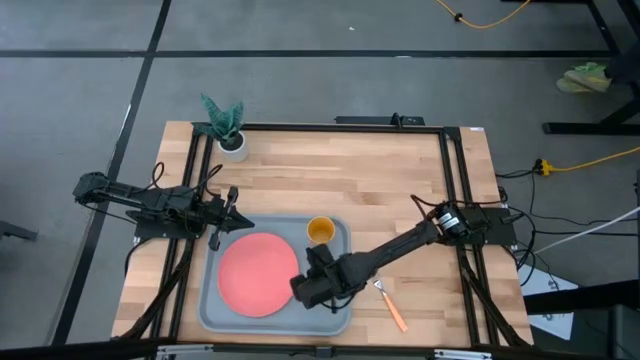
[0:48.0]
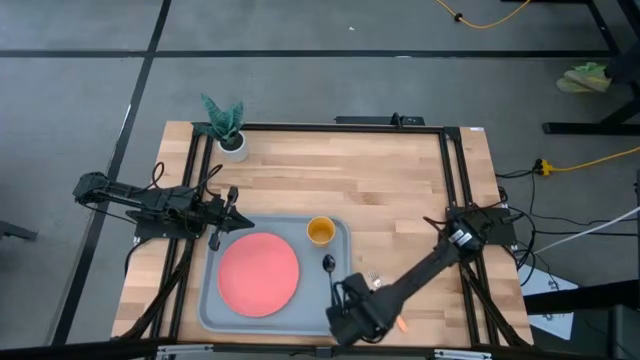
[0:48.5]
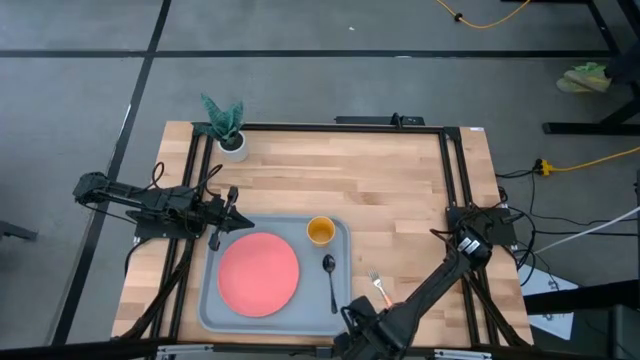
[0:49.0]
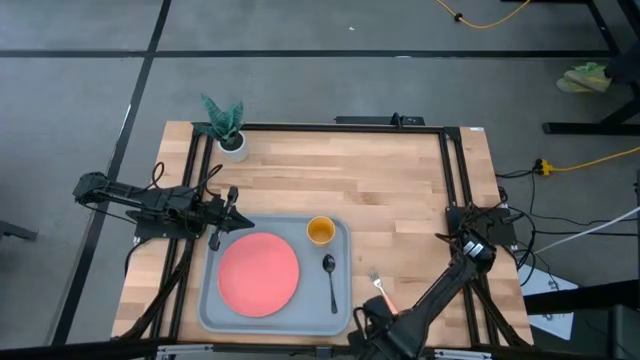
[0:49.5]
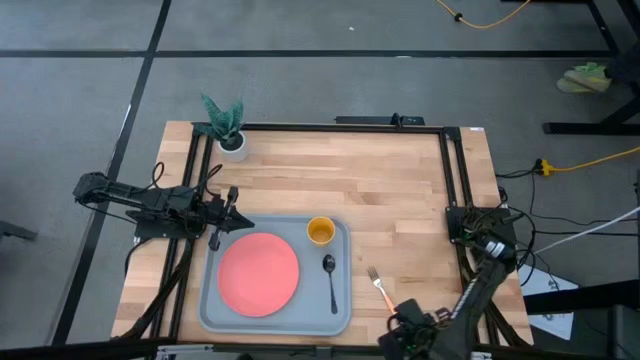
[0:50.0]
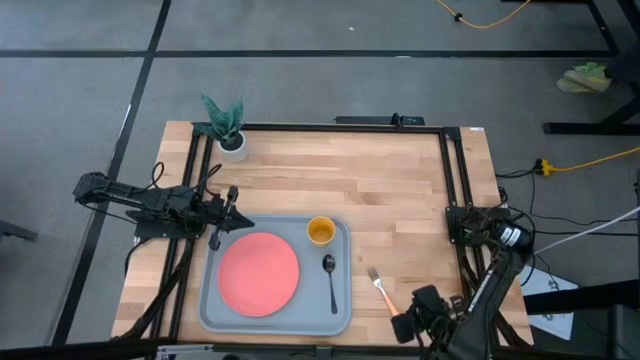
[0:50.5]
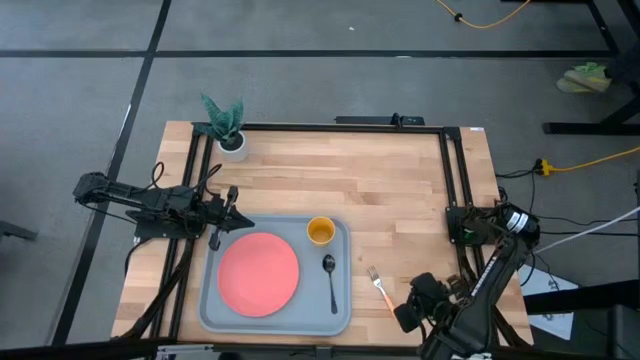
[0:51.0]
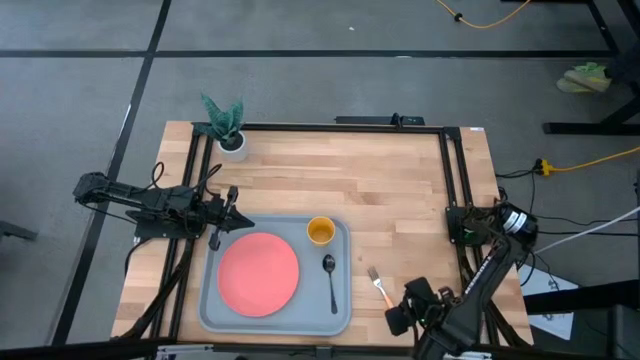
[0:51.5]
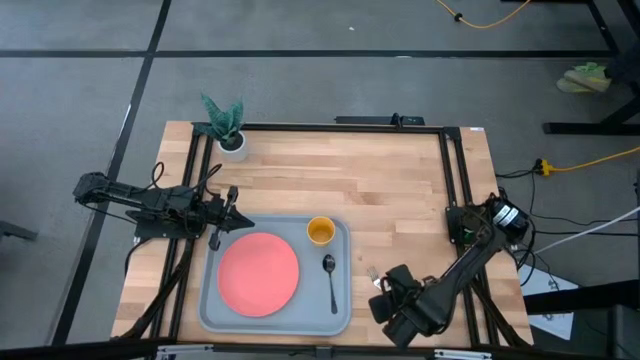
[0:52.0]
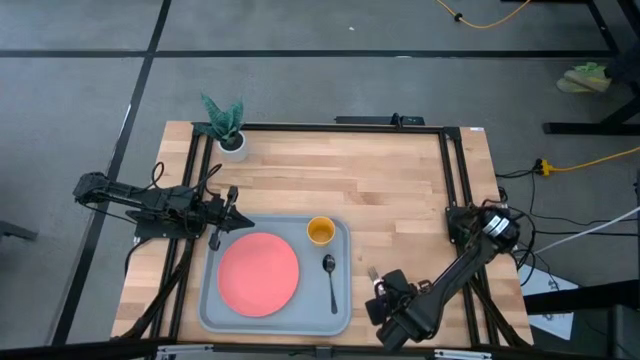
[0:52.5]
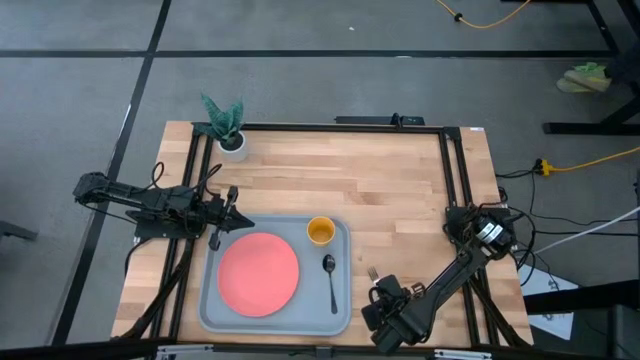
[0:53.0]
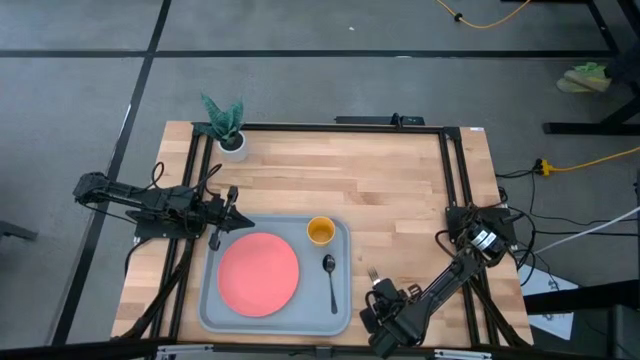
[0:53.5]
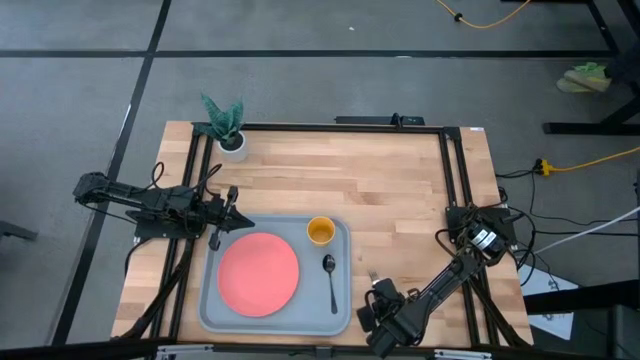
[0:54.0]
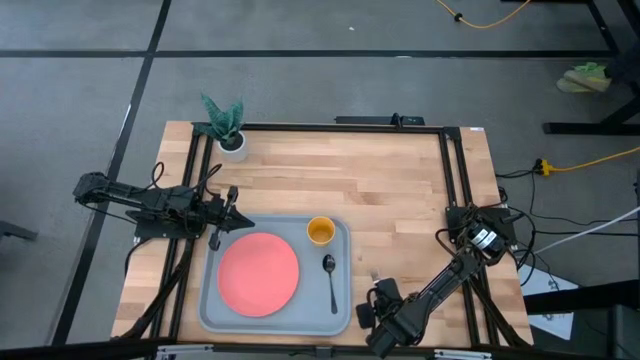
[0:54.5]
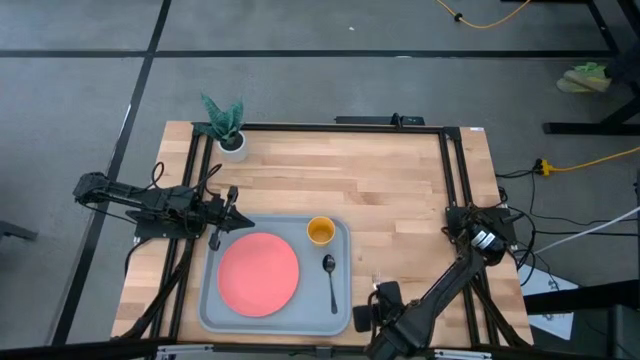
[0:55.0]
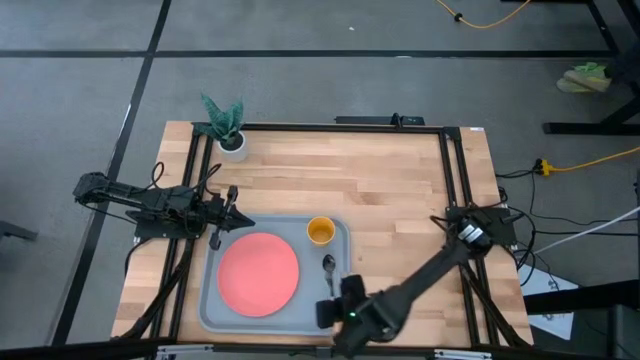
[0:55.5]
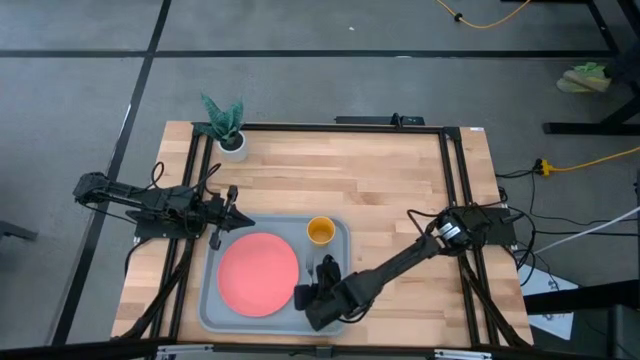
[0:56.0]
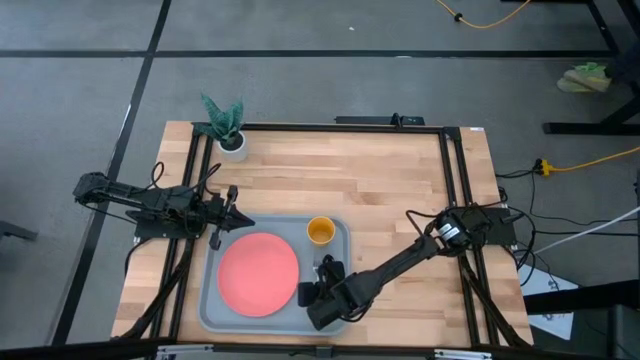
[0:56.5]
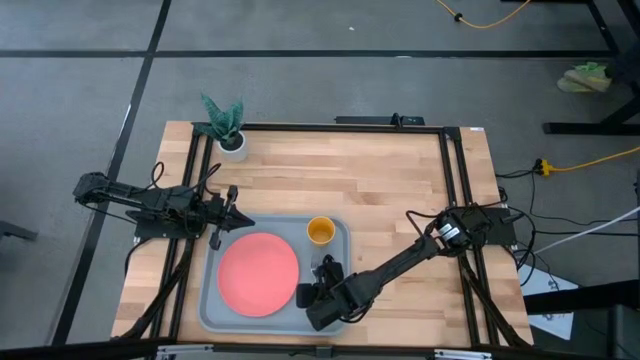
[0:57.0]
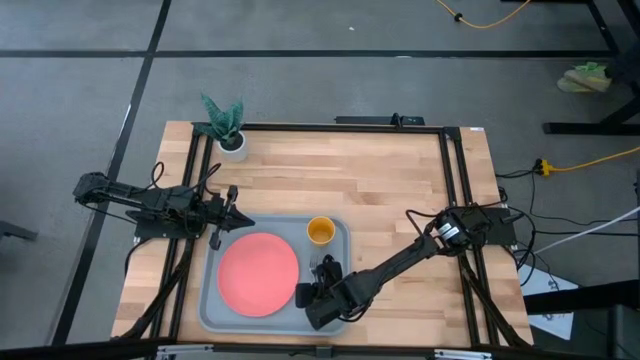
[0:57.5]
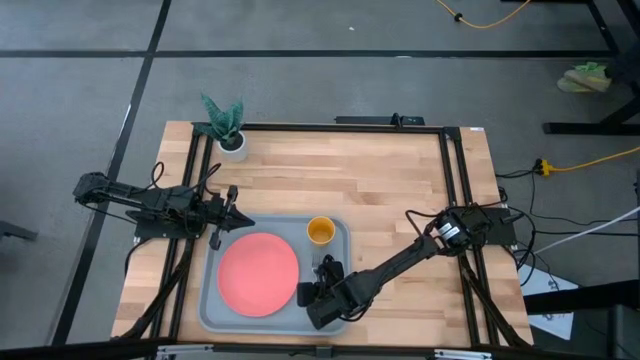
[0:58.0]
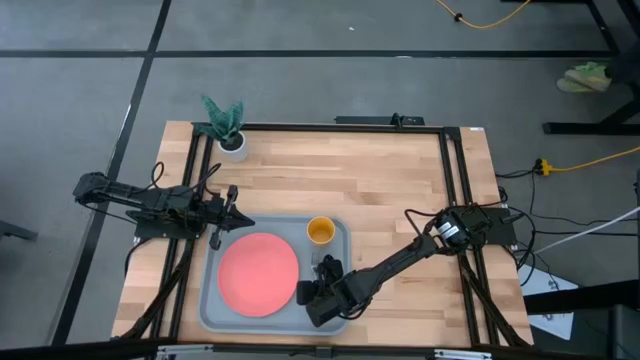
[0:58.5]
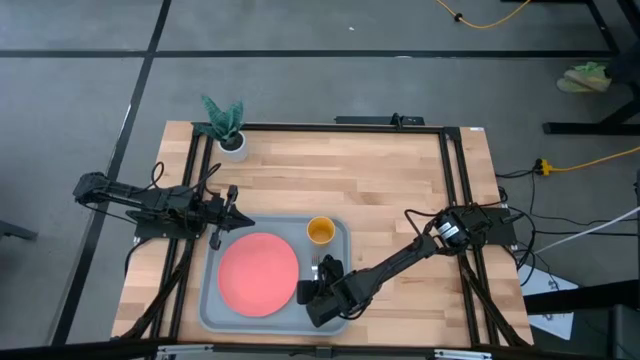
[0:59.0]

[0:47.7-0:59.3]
Task: Pick and place plate/cup/fork/spoon on tray
Put the orange fork on the gray tray

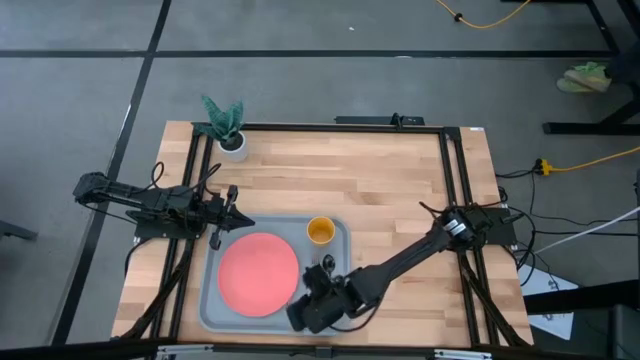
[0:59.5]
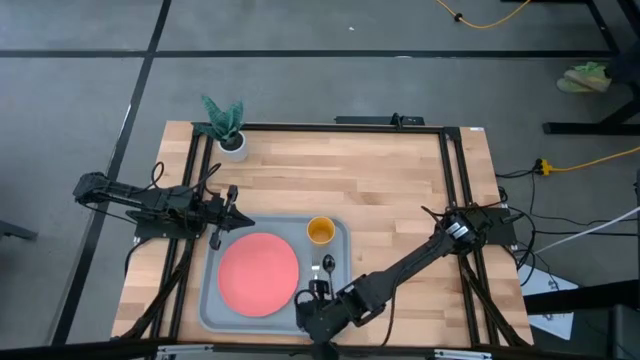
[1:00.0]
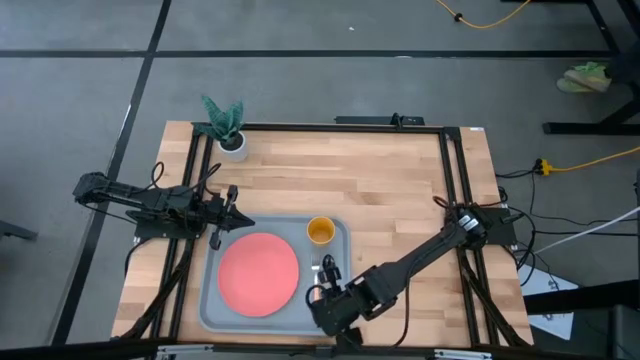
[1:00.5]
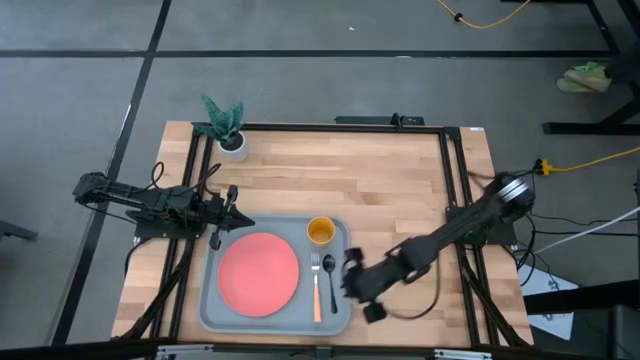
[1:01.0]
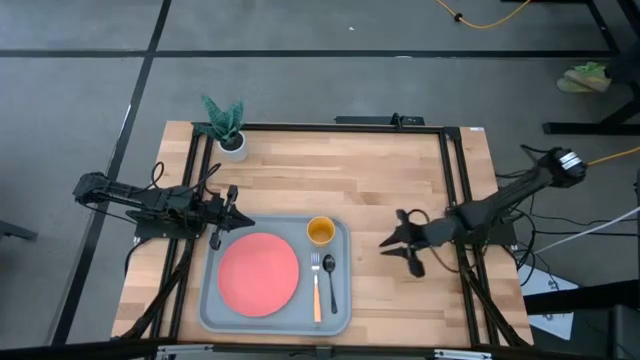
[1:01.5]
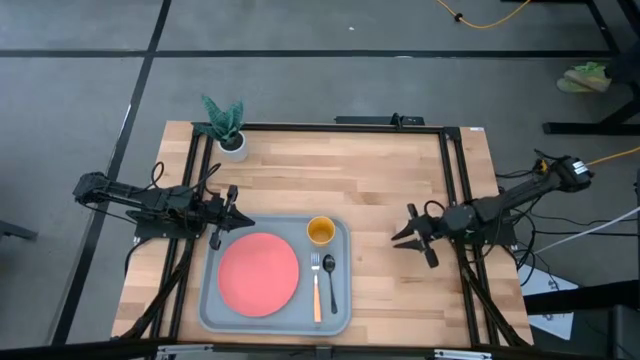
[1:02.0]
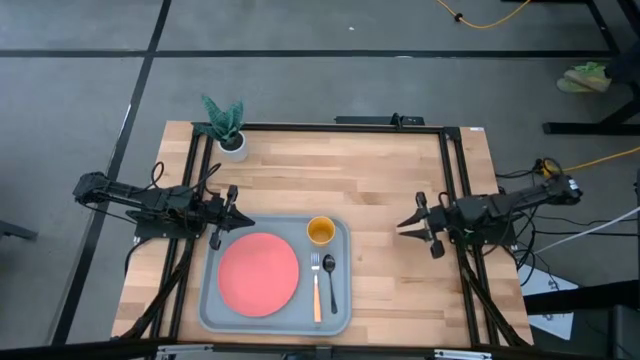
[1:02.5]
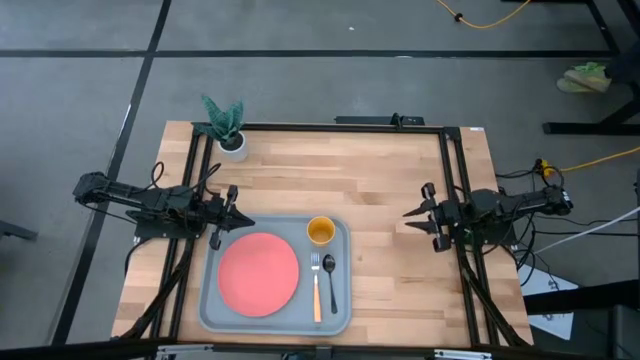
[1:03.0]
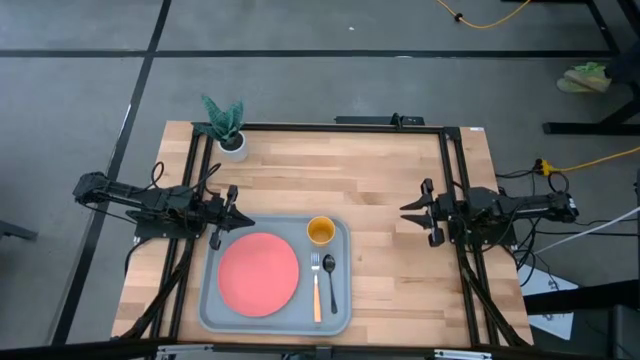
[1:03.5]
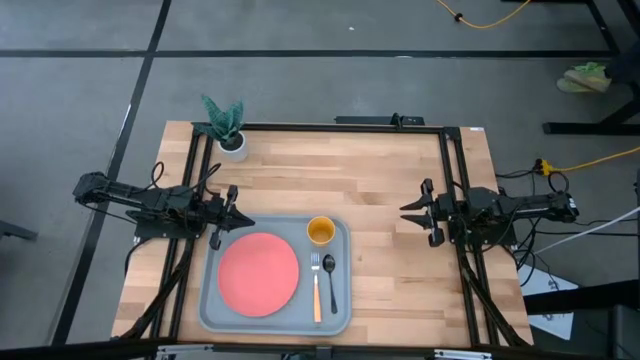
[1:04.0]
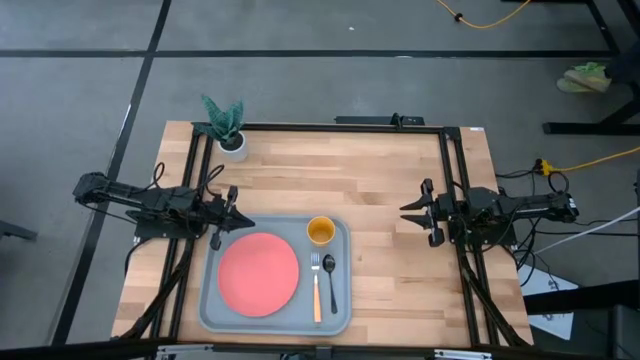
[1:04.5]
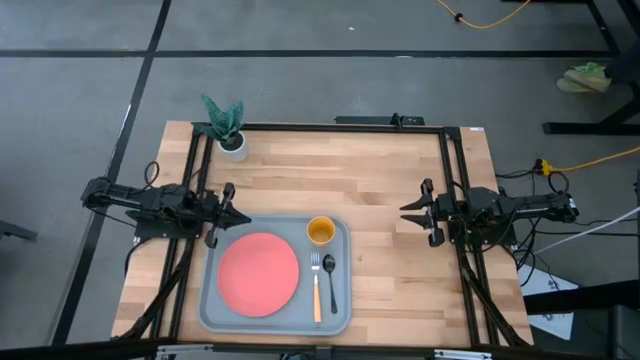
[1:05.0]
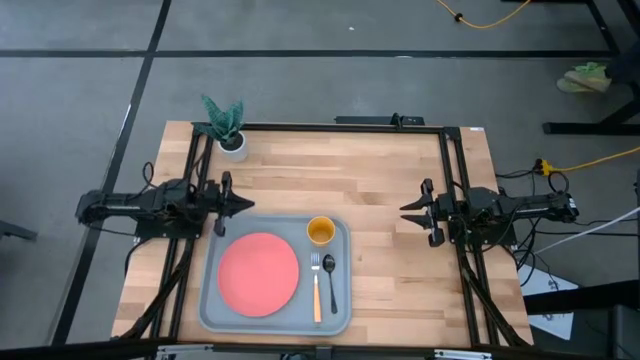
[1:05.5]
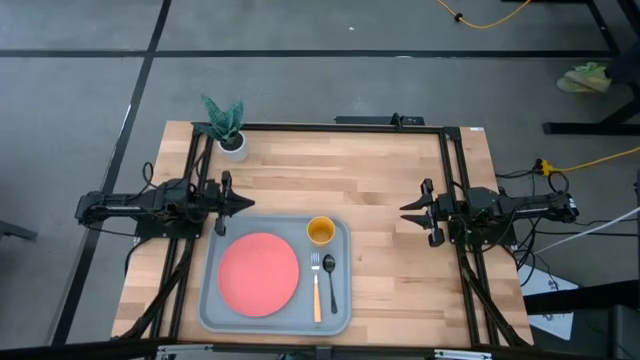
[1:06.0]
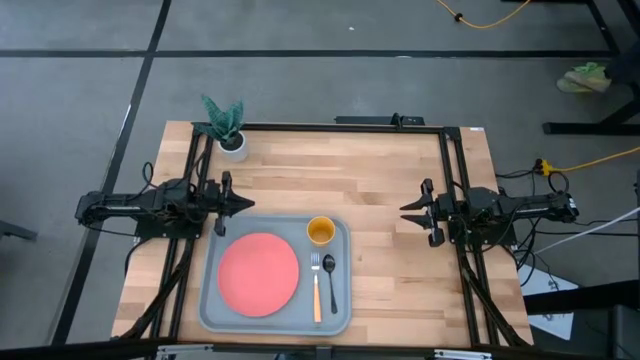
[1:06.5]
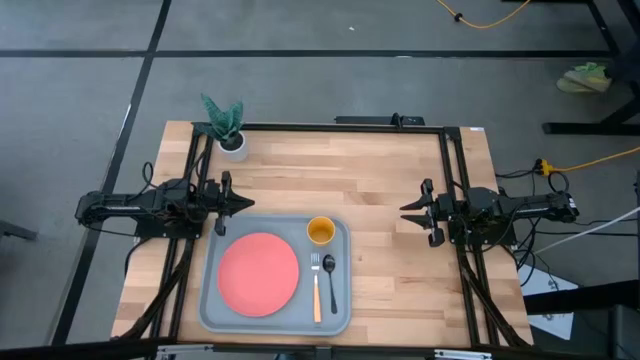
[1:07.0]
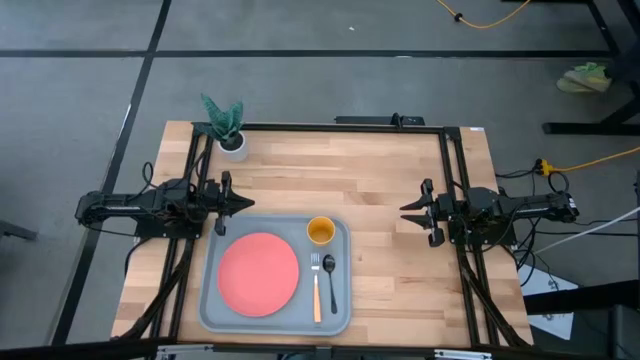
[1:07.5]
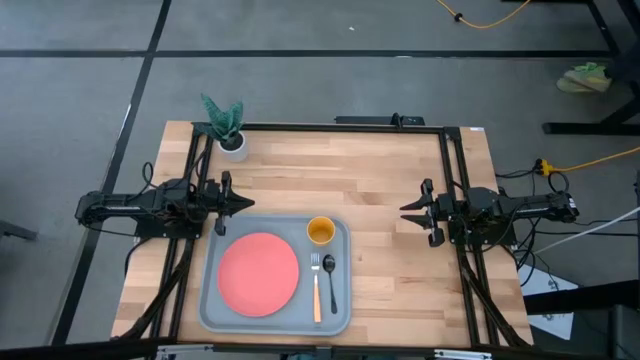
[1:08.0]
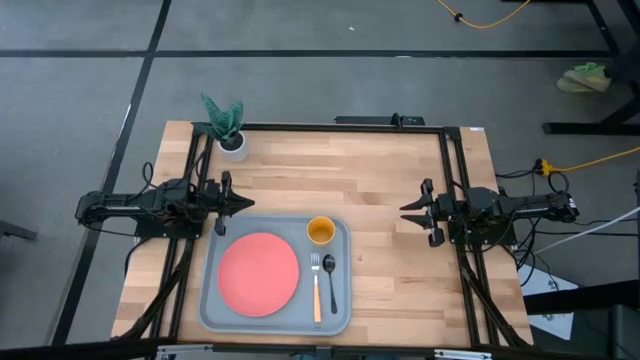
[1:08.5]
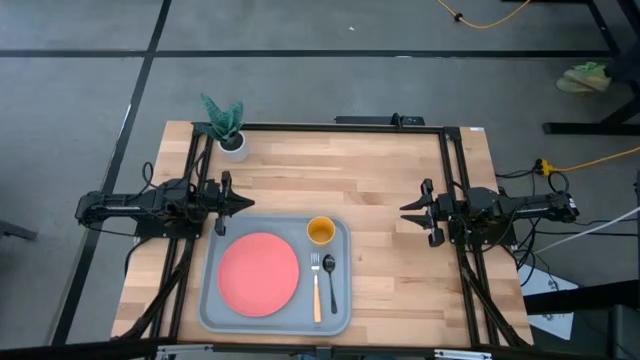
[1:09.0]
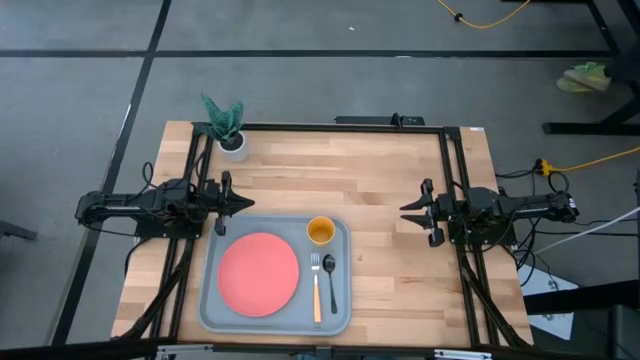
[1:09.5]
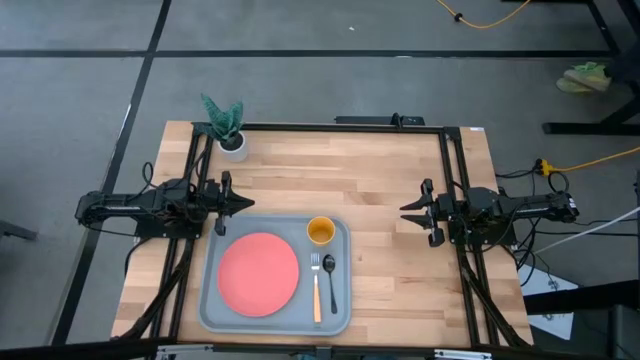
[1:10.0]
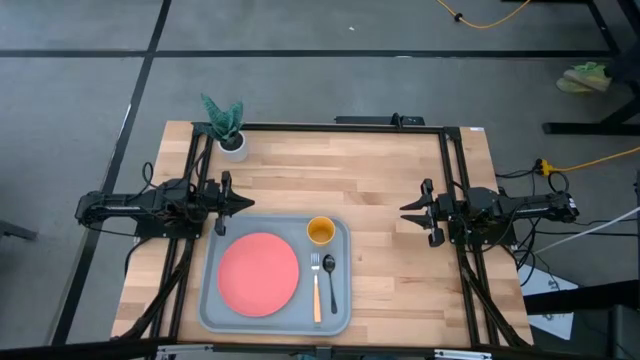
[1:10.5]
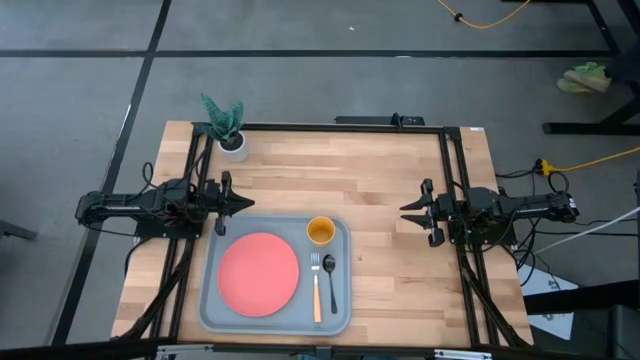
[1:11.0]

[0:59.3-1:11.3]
Return To Home Position
